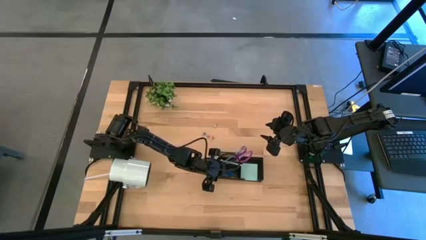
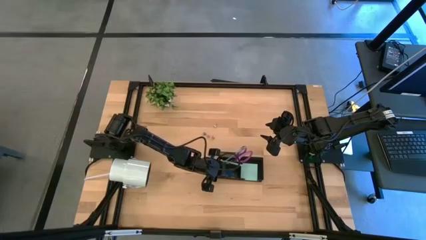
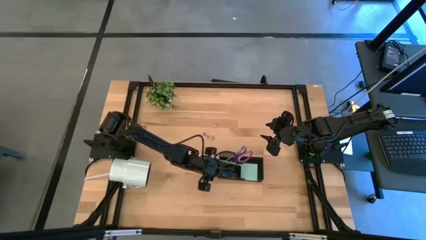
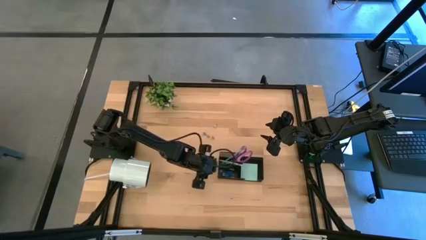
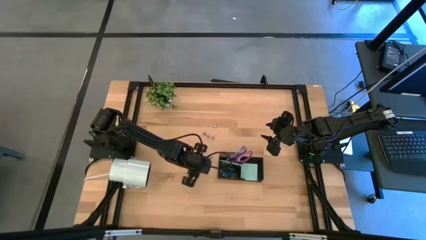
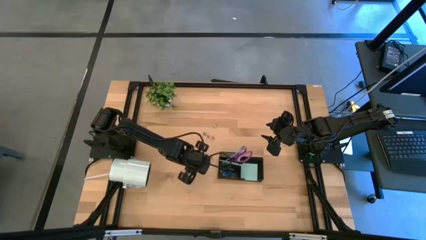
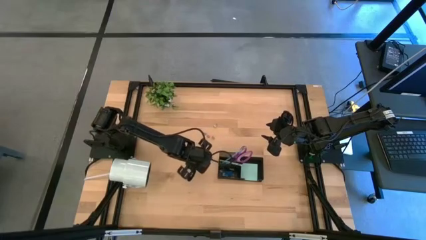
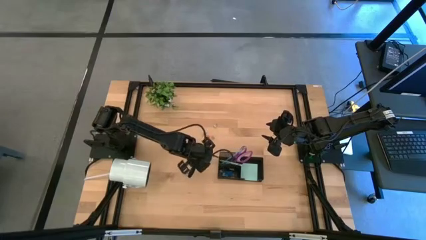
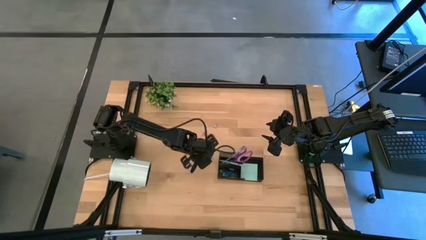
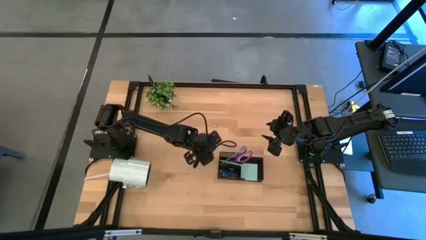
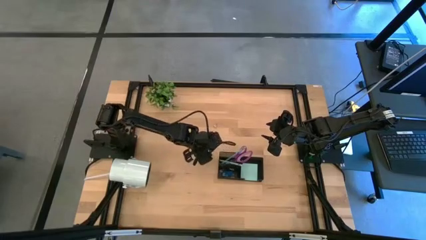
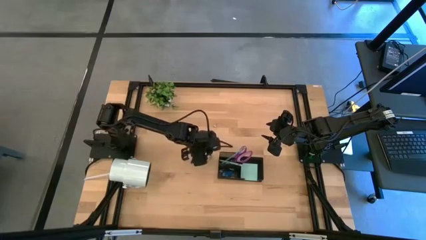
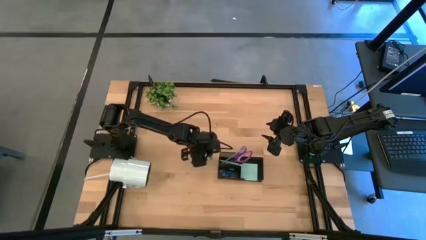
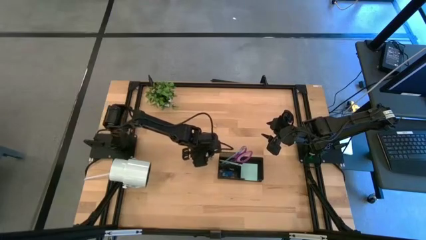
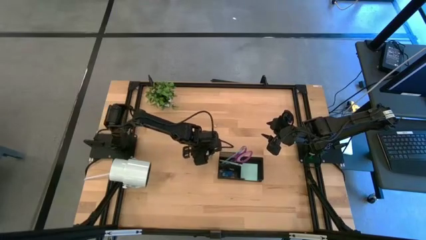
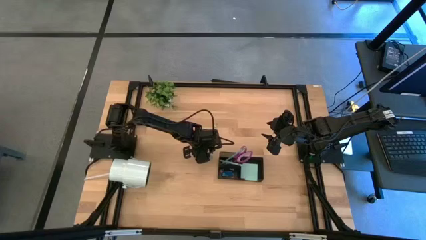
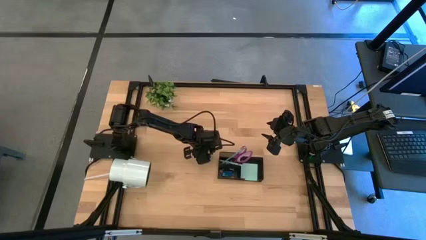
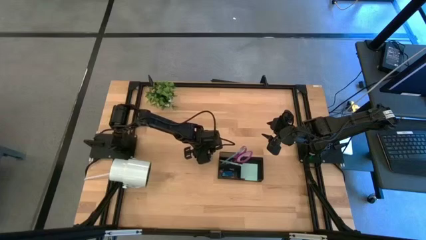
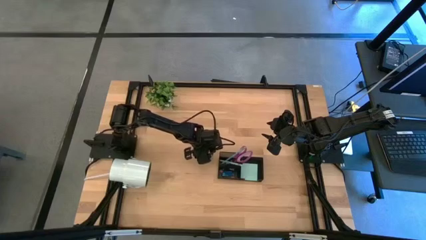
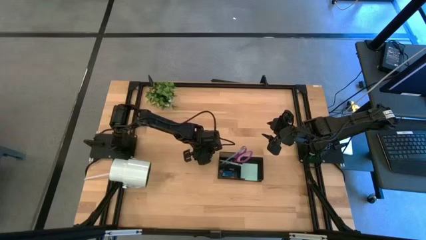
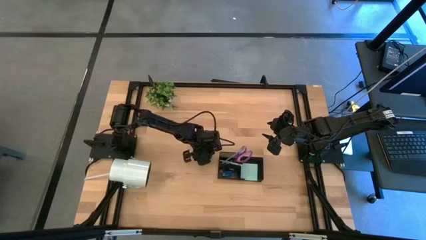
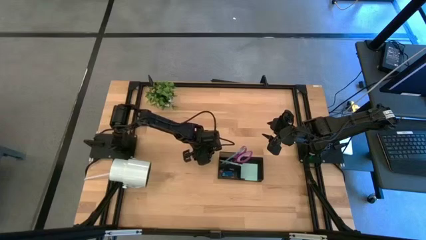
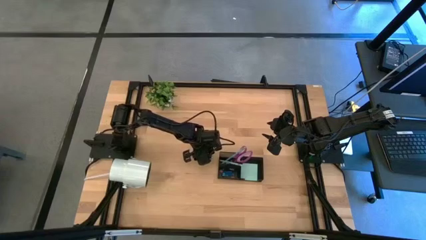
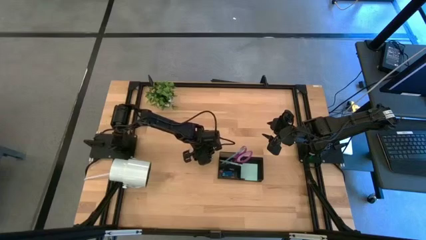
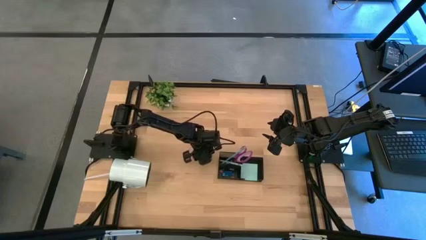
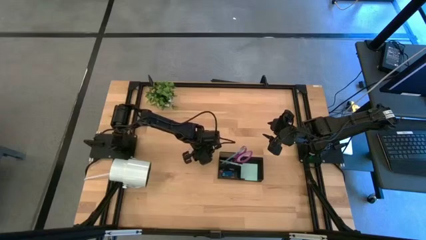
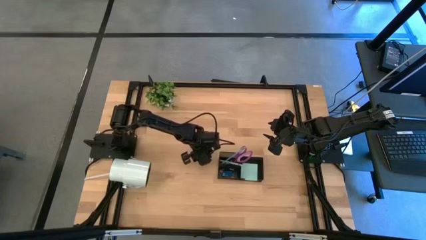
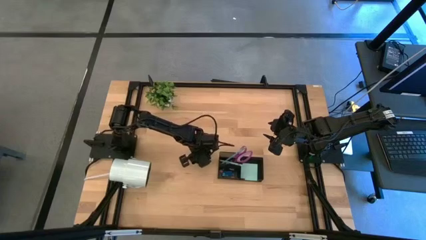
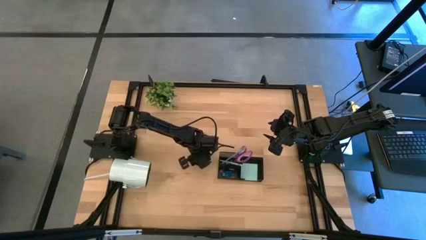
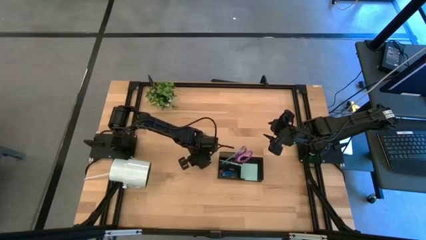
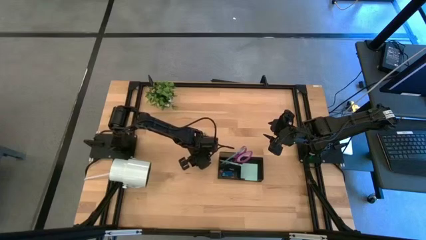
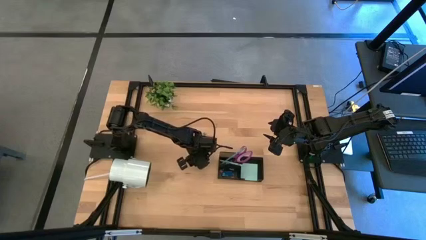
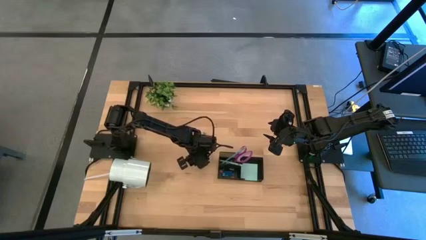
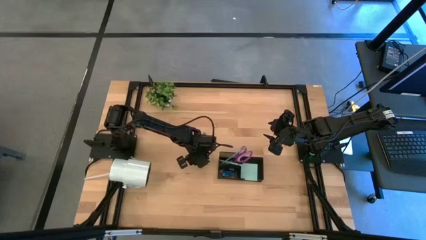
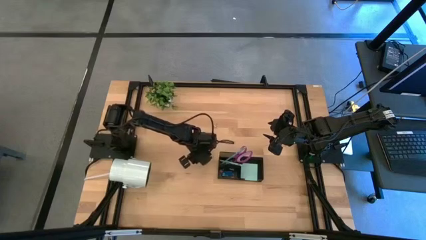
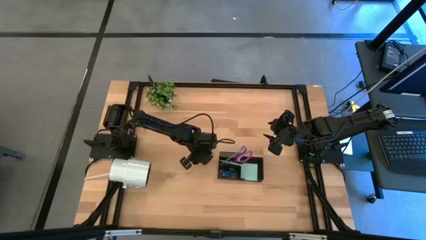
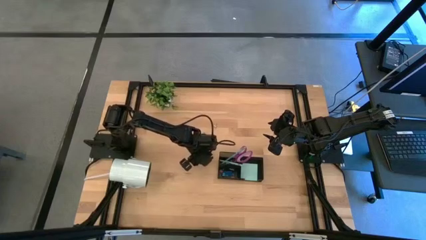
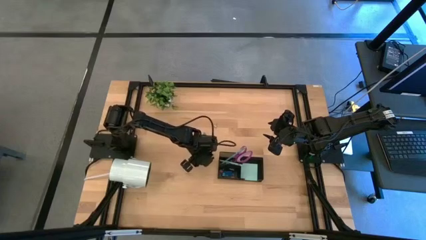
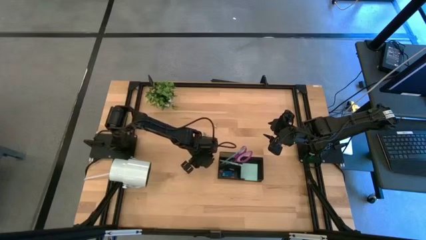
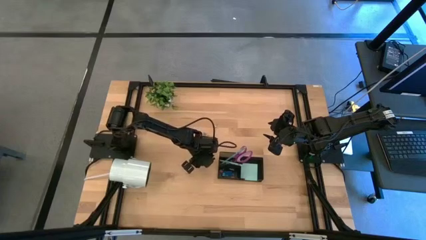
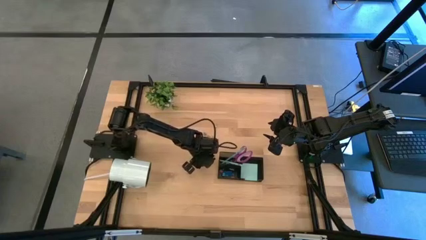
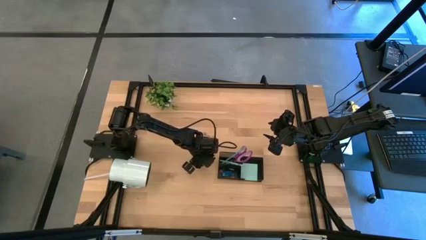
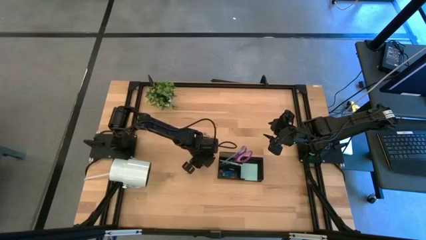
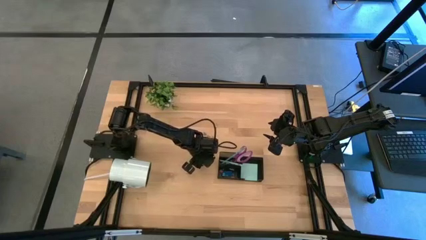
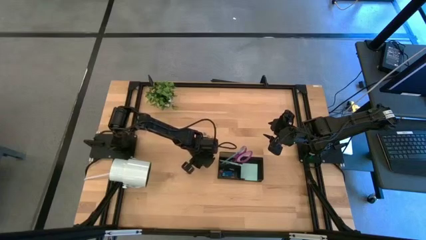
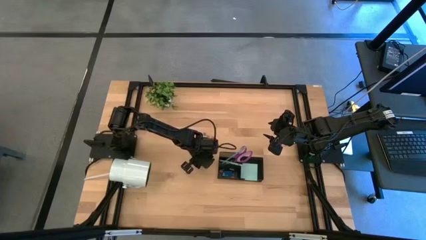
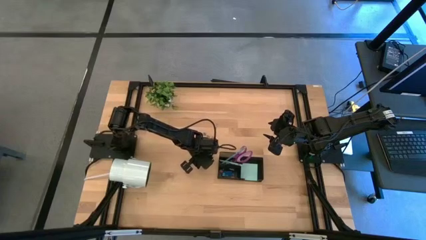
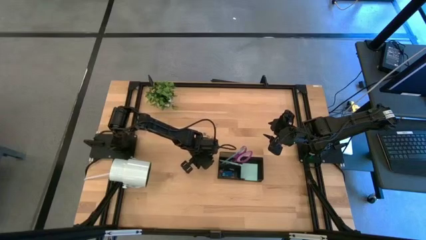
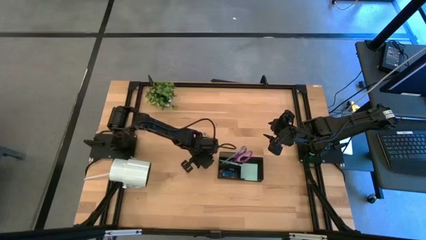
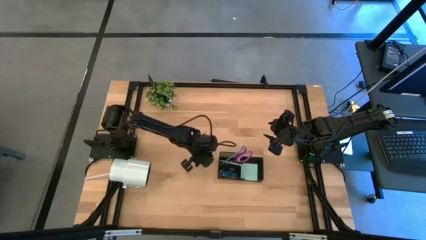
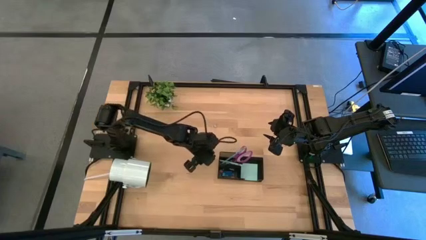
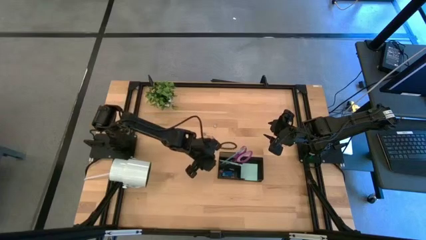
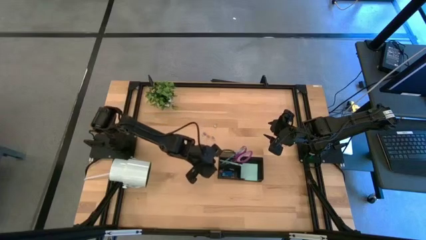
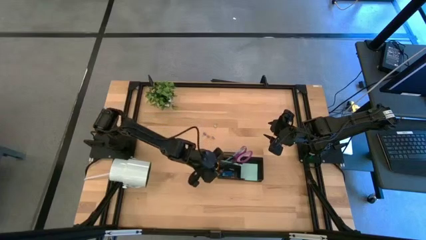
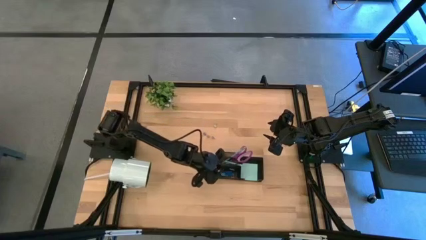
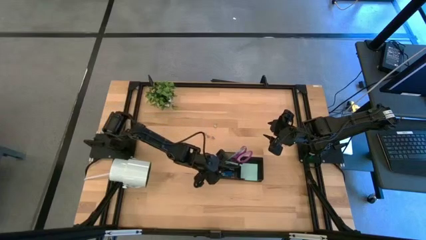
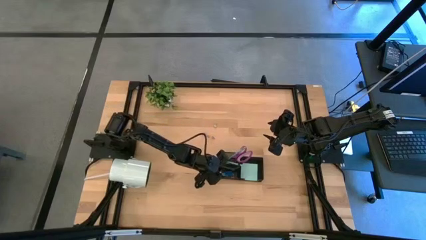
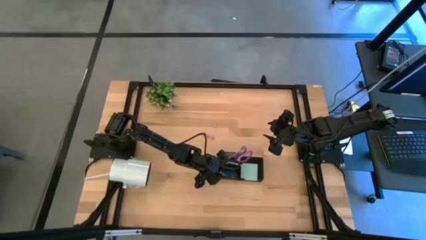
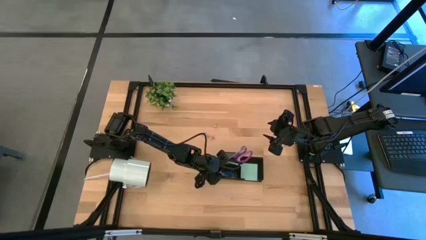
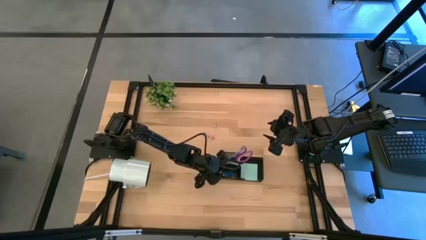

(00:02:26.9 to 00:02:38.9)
Task: Pick and place office supplies into organizer
Put the top blue binder clip into the desk organizer

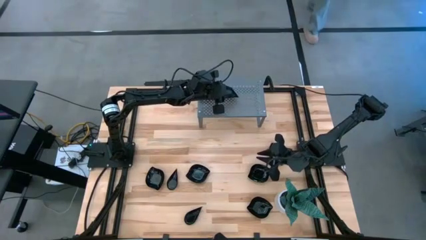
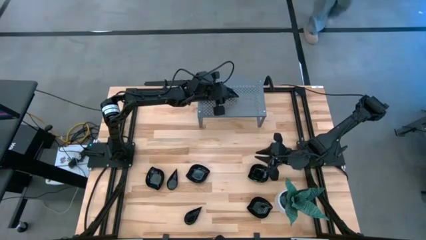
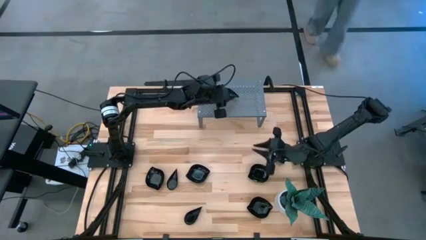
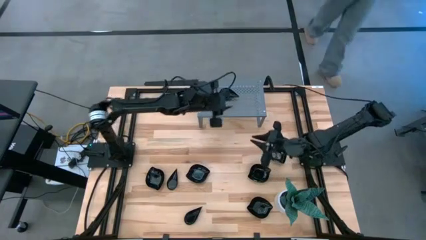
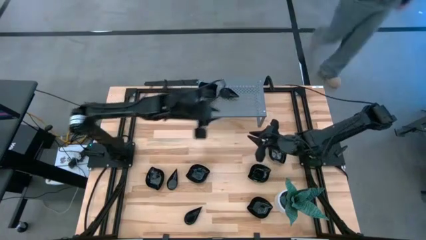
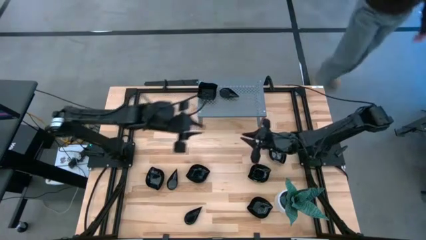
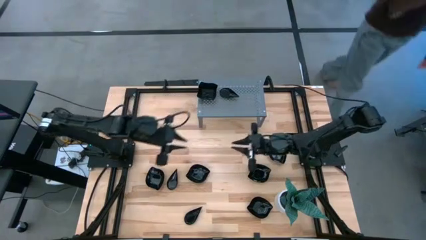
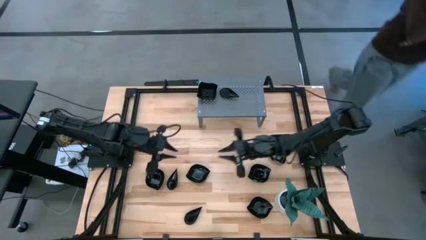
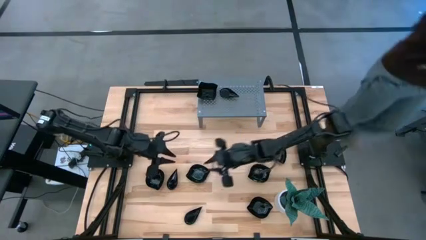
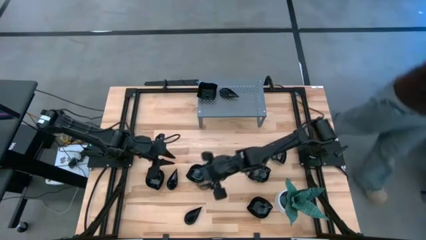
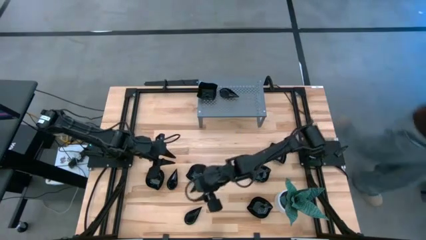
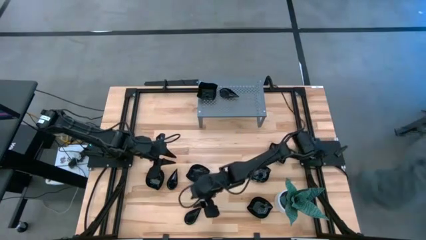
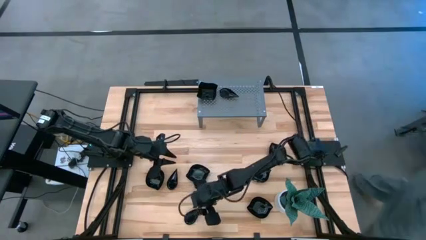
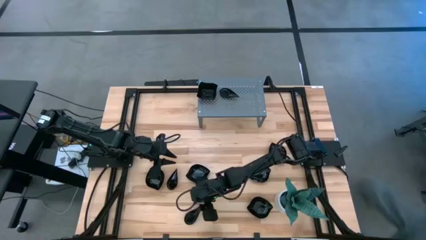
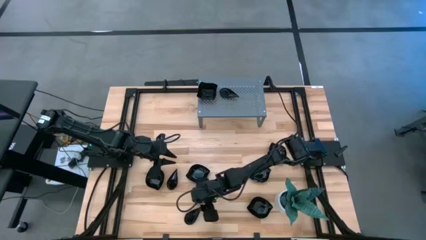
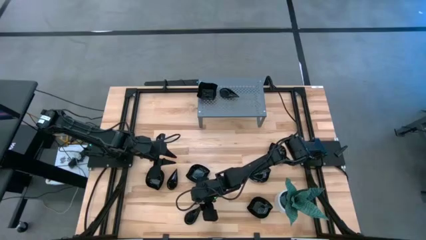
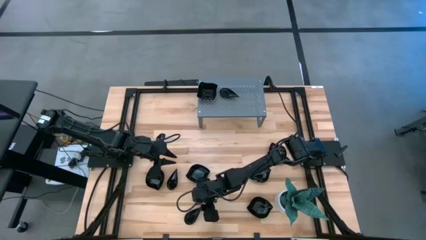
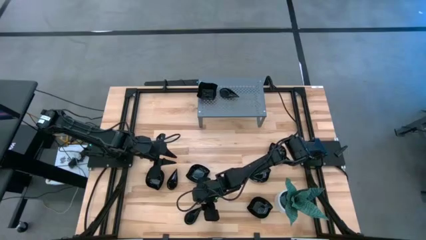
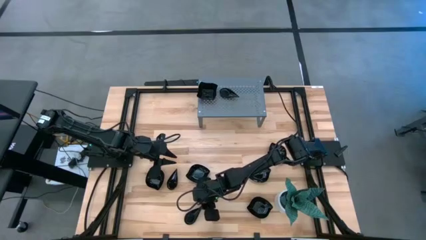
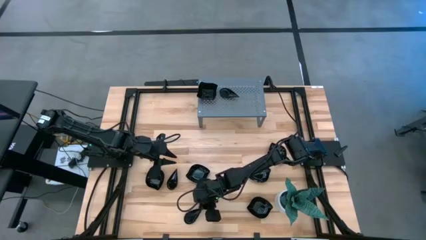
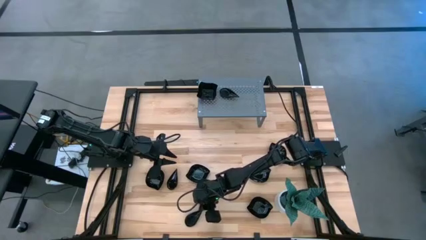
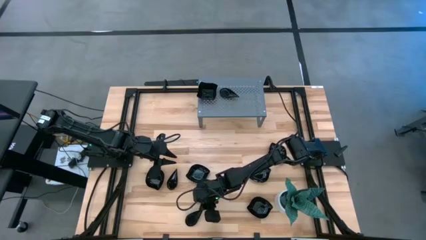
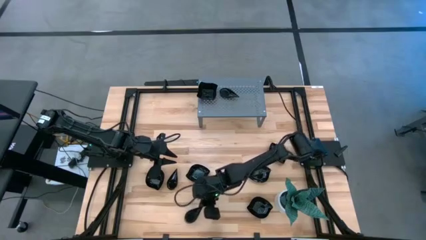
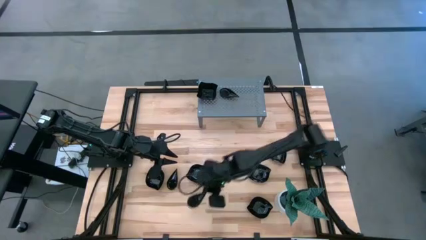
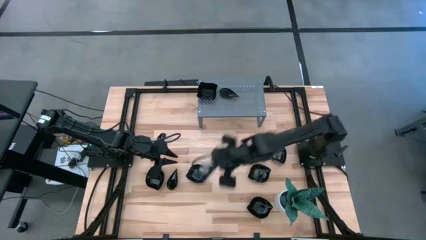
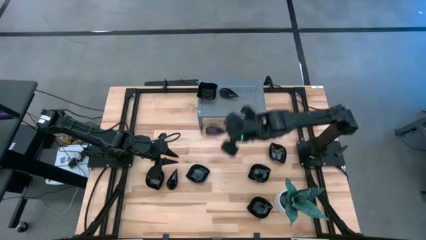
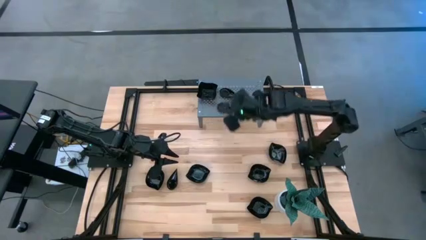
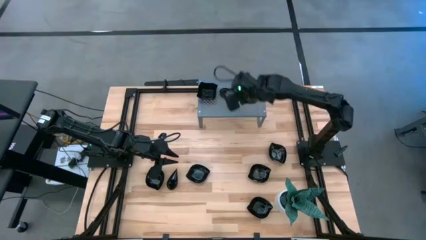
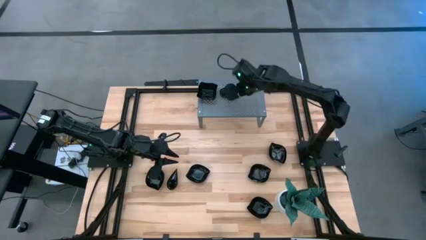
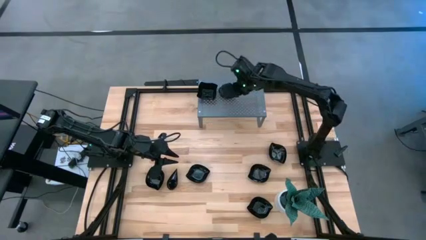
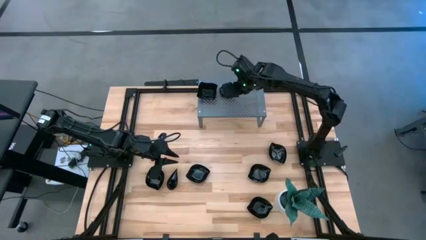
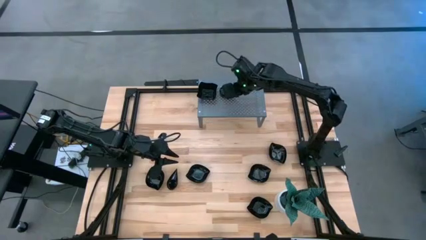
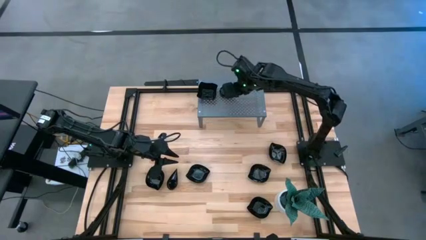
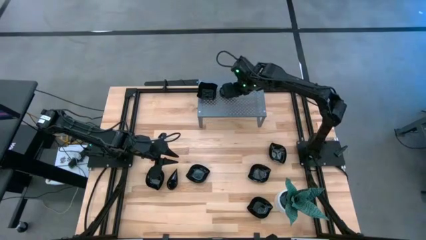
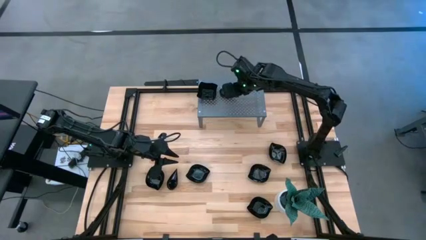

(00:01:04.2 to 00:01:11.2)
Task: Pick & Place Mini shaped plates
Stack the drop-shaped plate on top of the drop-shaped plate on the shelf
